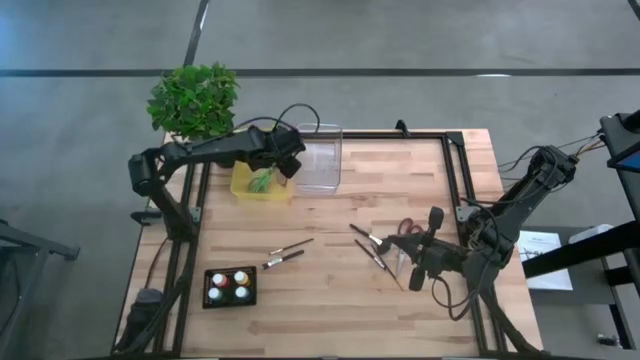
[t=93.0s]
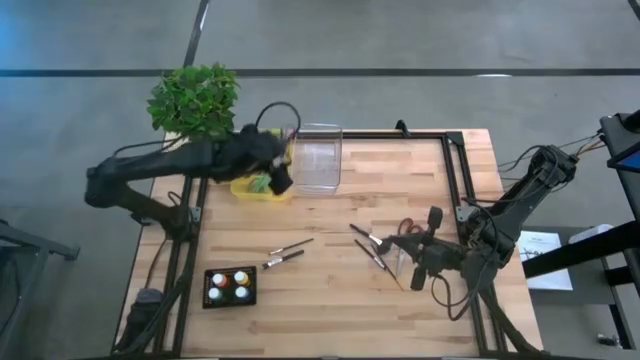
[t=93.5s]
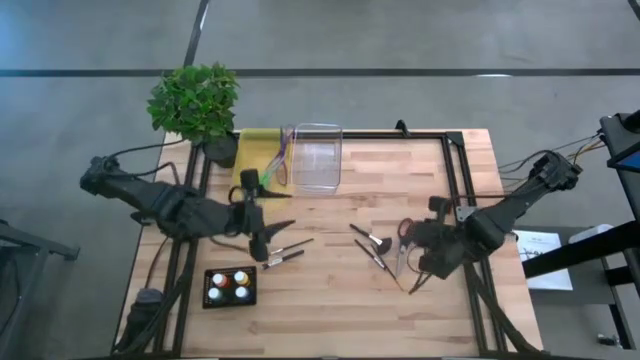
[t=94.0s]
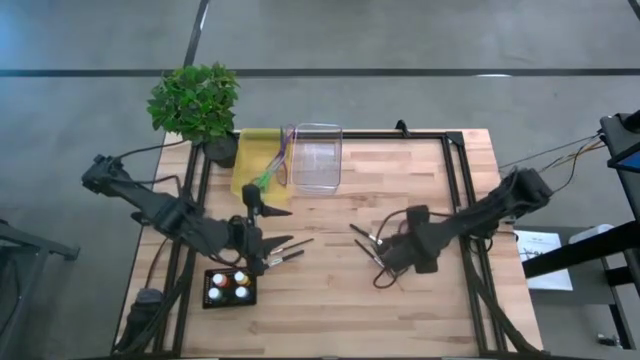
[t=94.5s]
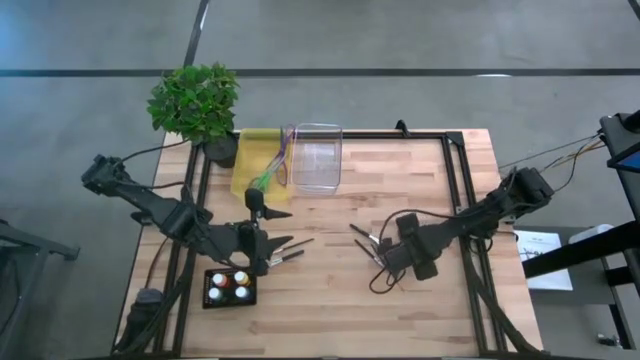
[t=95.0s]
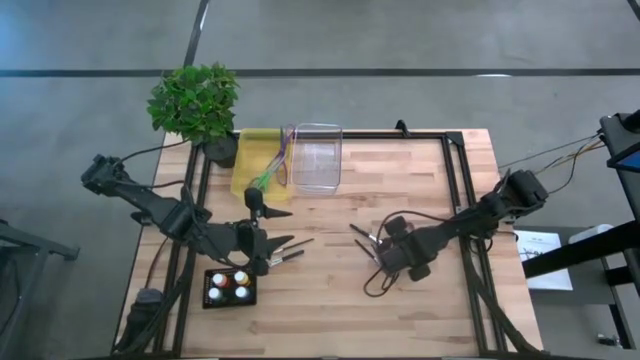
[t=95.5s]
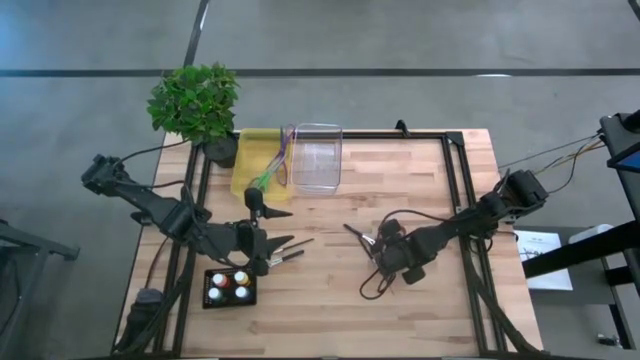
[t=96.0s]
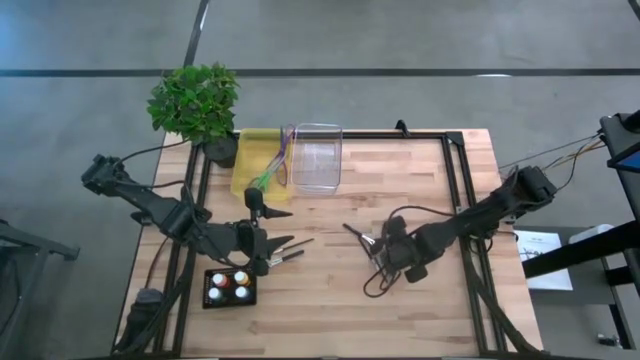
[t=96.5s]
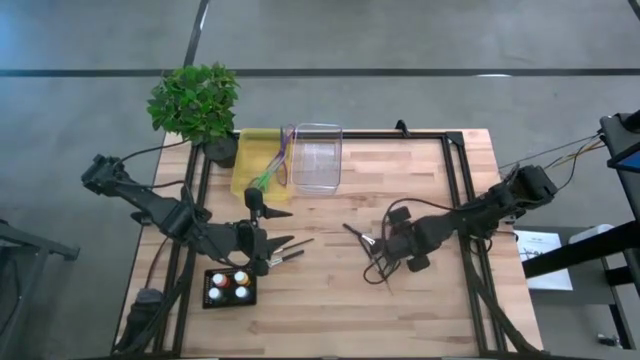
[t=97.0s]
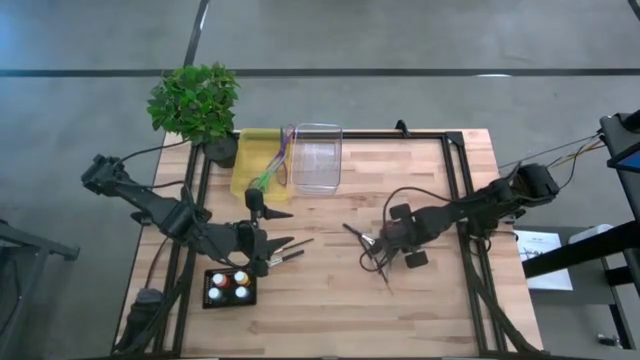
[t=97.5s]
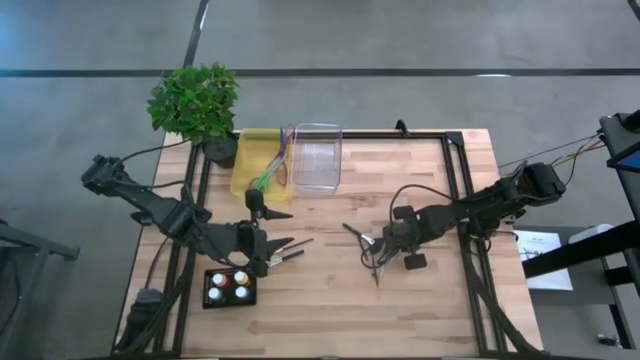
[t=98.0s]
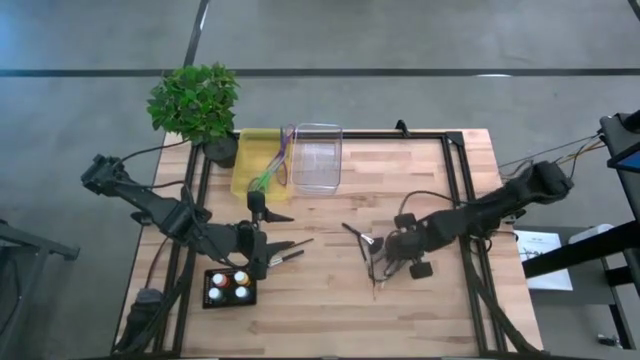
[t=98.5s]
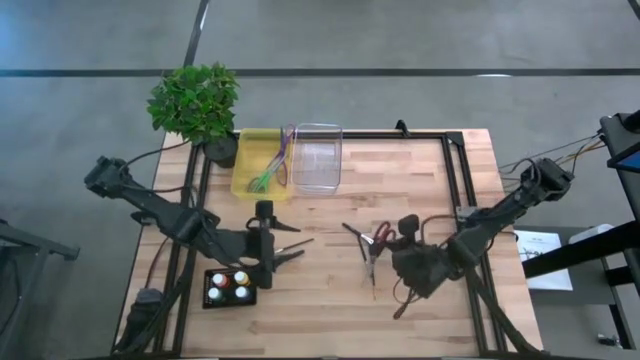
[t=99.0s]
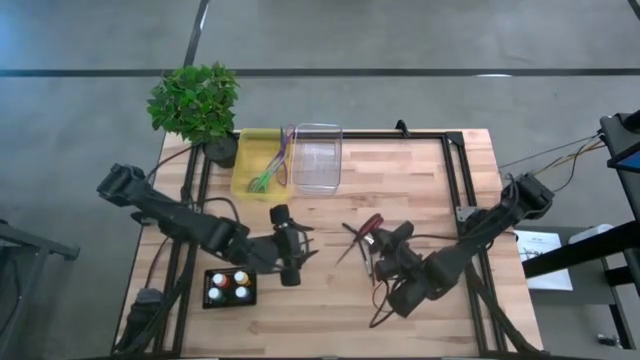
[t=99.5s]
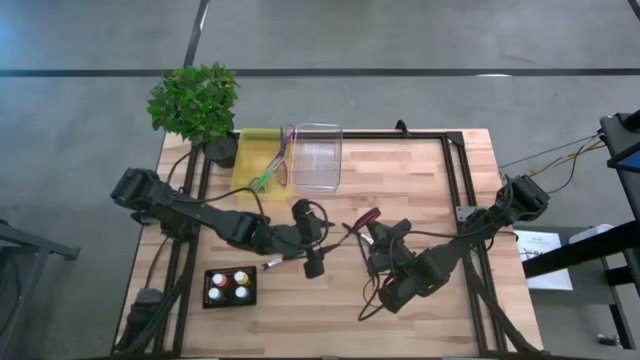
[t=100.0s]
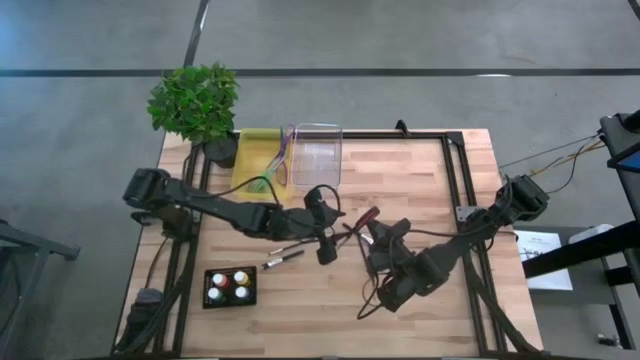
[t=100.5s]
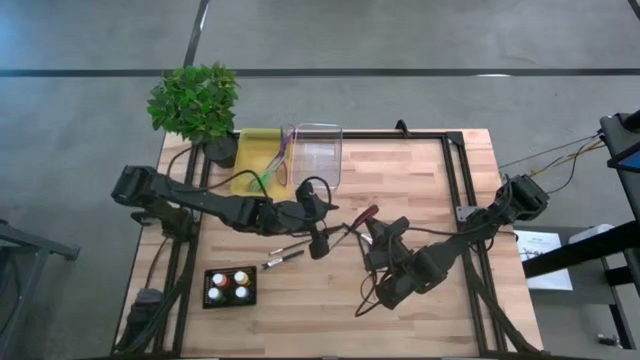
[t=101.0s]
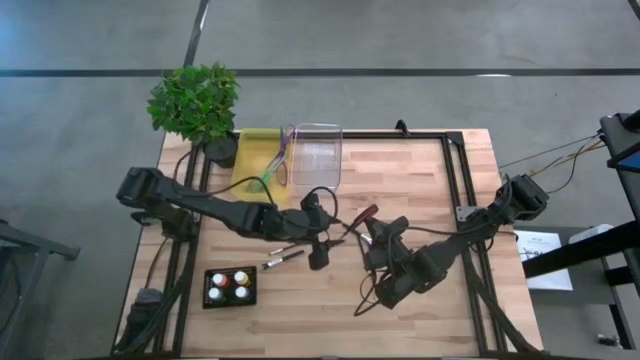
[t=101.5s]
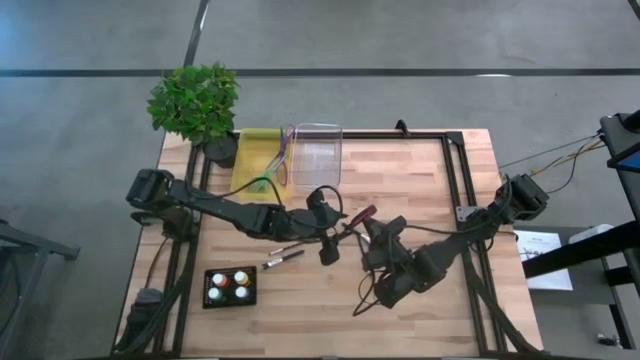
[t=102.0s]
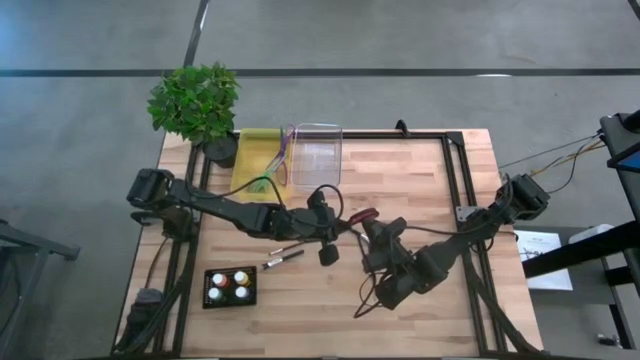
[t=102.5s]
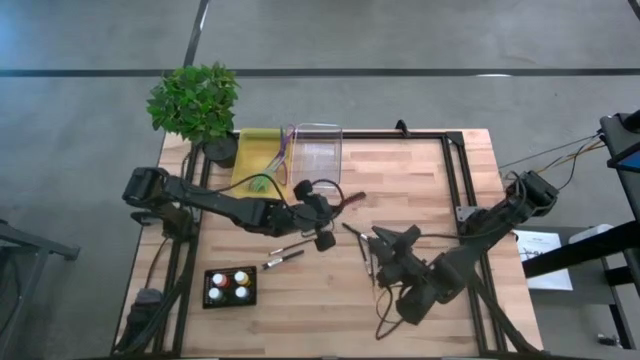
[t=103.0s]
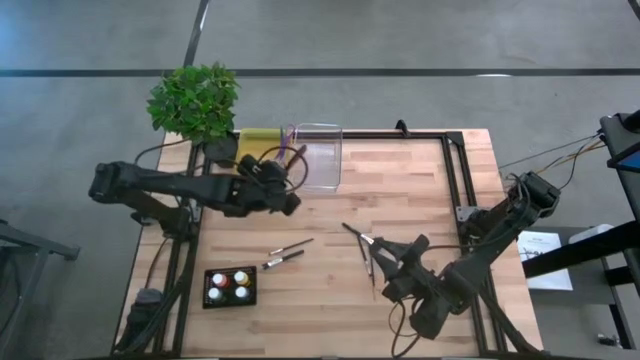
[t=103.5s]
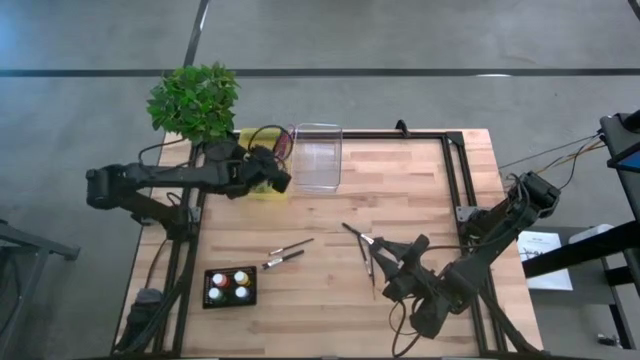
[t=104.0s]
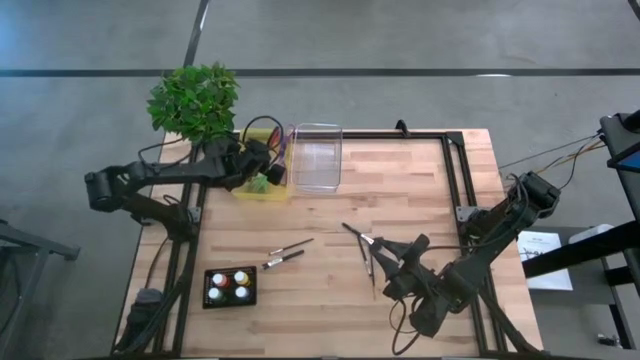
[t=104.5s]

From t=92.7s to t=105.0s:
Task: Pick & Place Paint Supplies
Put the black scissors into the transparent yellow bin

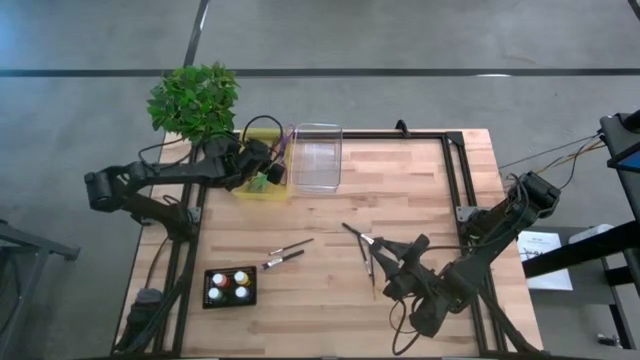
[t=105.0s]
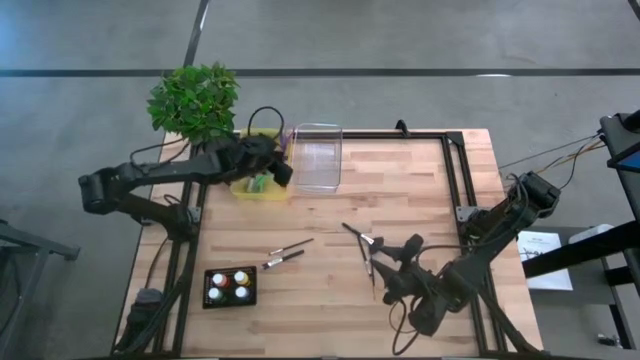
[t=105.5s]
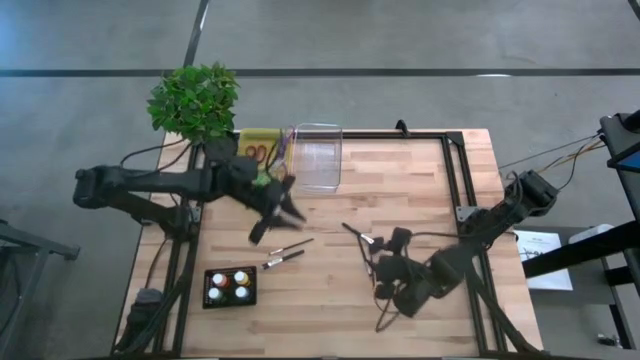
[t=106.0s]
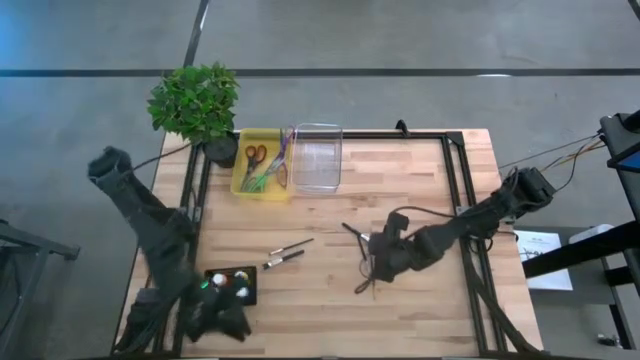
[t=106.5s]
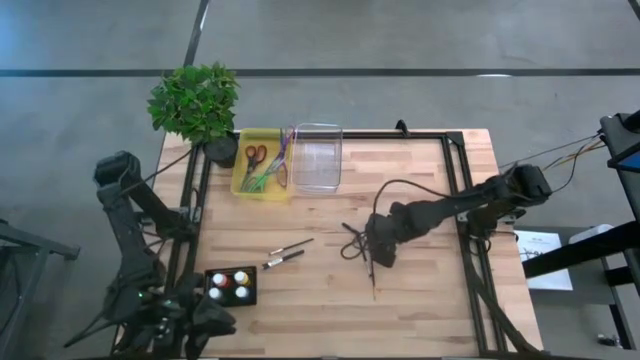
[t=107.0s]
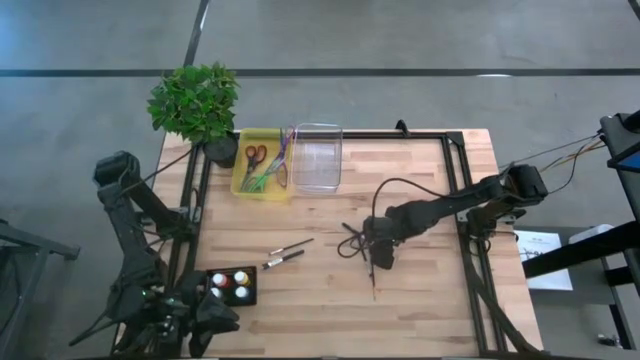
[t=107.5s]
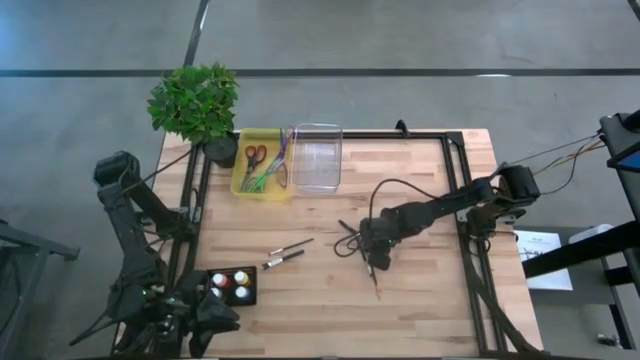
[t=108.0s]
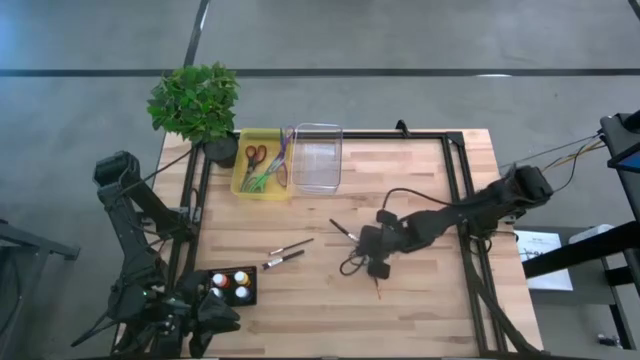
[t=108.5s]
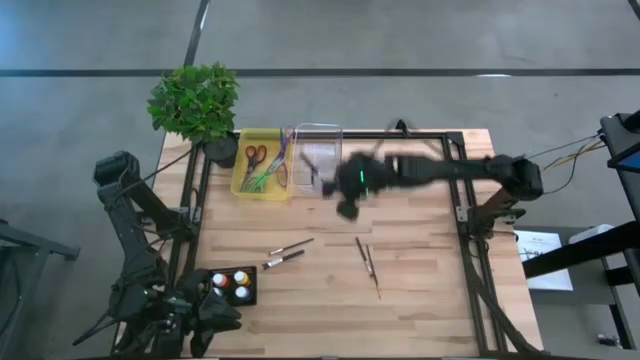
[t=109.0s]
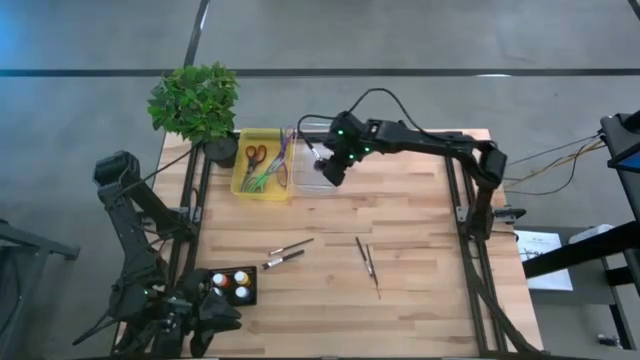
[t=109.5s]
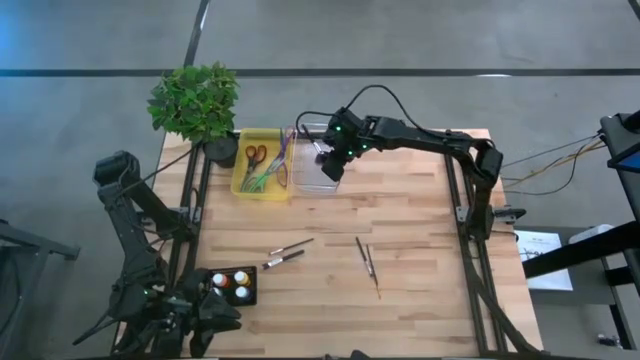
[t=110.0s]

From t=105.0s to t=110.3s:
Put the silver and black highlighter brush into the transparent bin

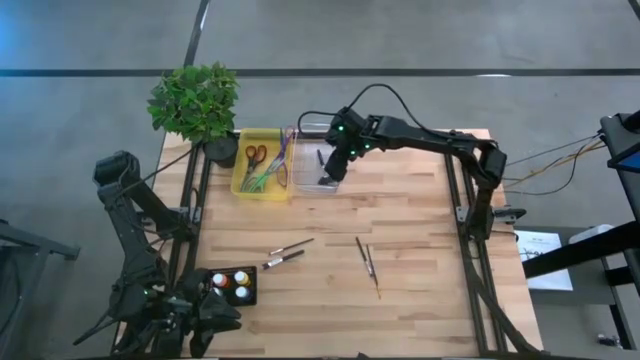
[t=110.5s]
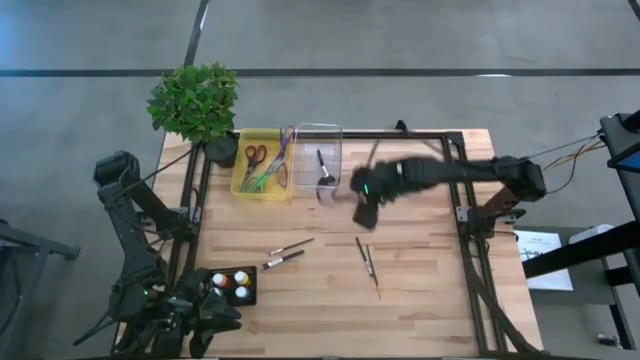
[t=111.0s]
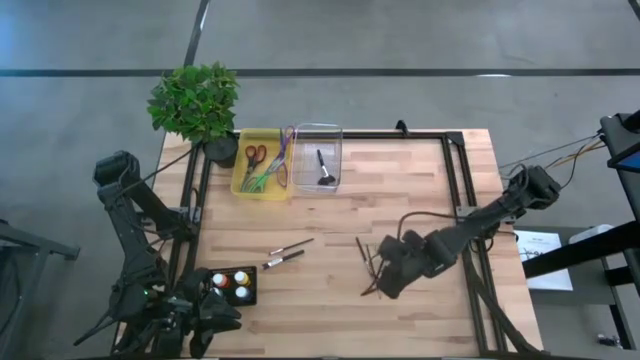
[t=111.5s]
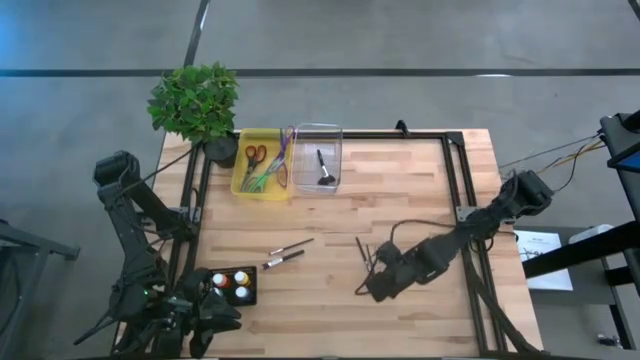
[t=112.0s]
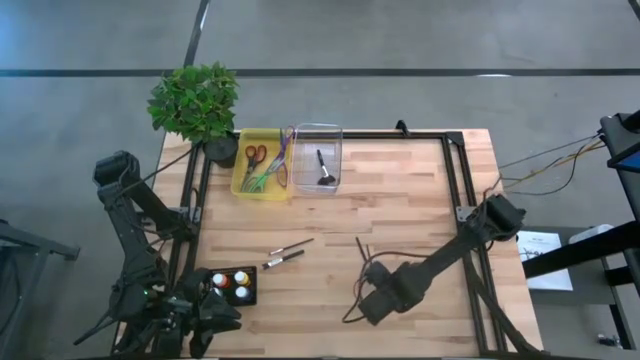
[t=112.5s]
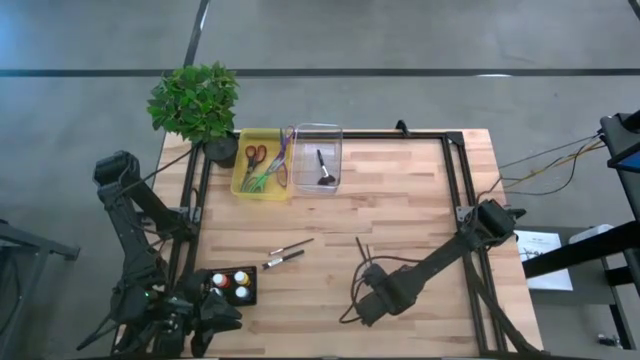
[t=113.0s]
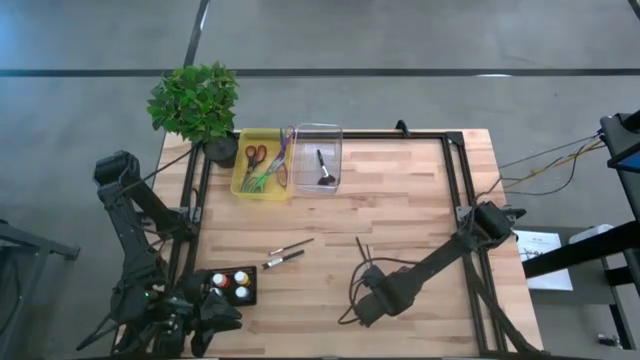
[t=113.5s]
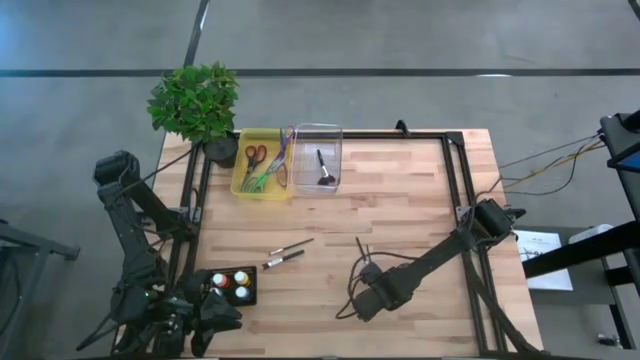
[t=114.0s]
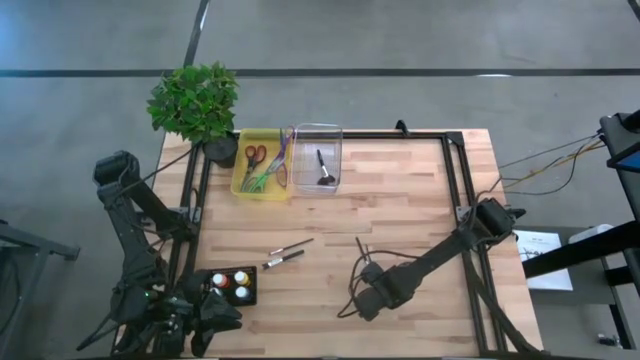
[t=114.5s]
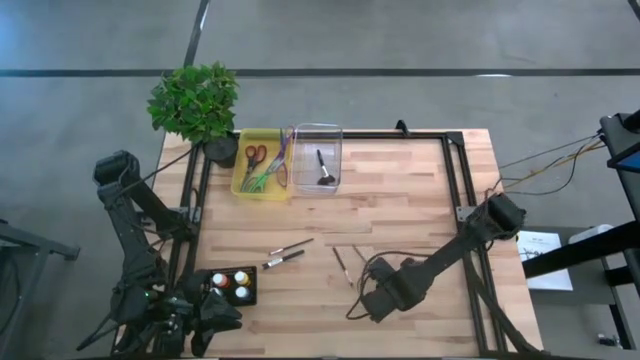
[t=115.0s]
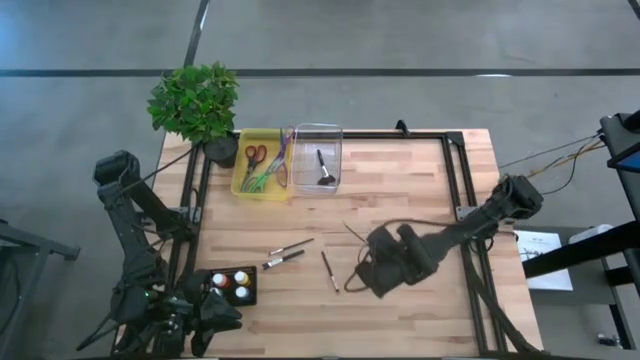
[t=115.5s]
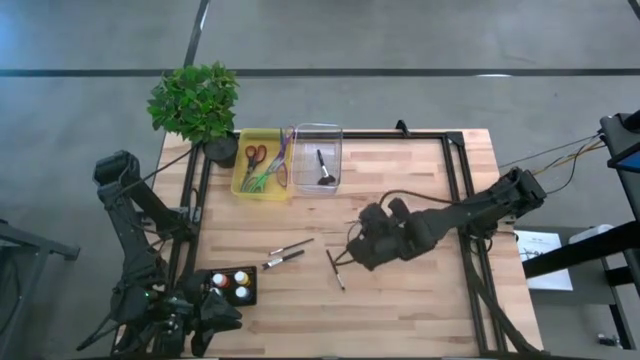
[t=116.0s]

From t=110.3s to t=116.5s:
Put the gold and black paintbrush into the transparent bin
